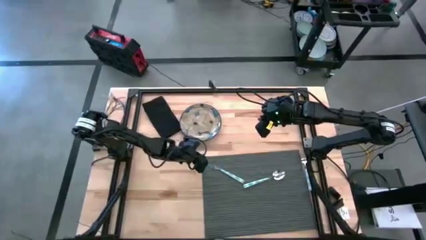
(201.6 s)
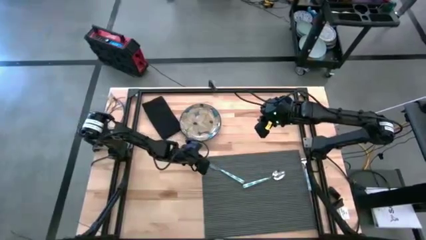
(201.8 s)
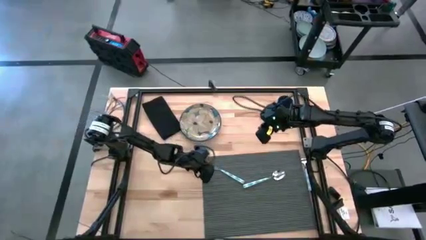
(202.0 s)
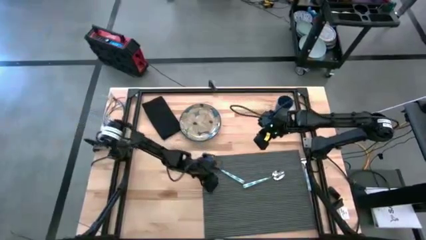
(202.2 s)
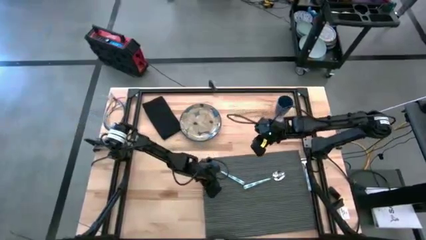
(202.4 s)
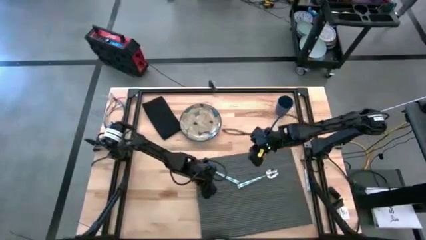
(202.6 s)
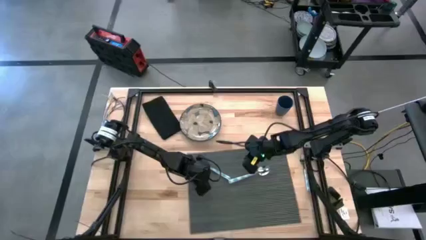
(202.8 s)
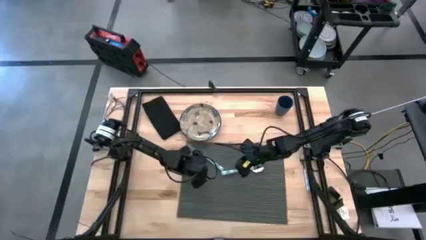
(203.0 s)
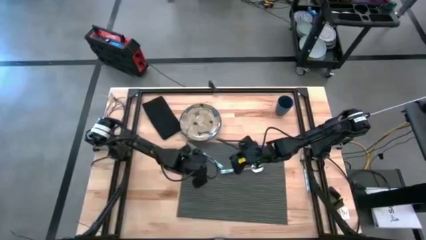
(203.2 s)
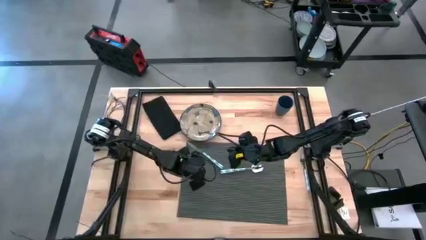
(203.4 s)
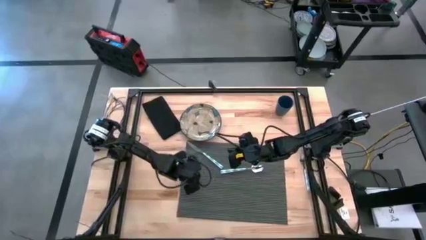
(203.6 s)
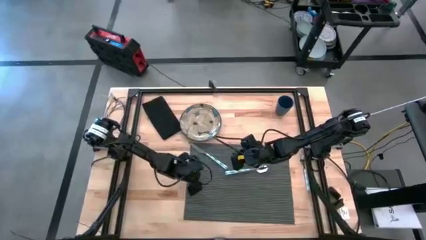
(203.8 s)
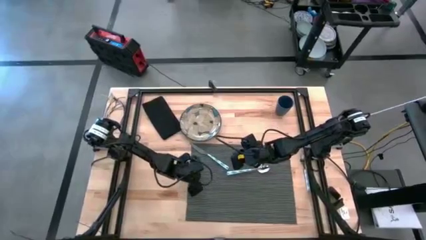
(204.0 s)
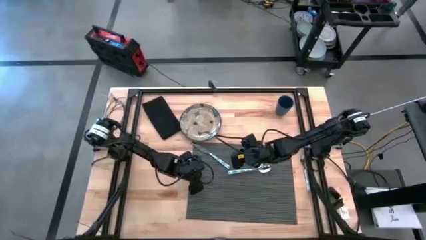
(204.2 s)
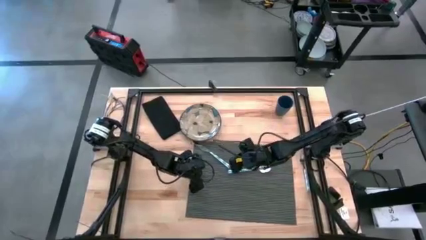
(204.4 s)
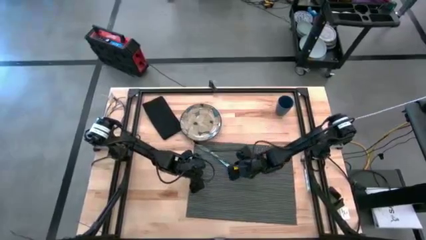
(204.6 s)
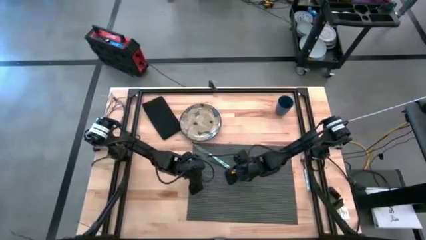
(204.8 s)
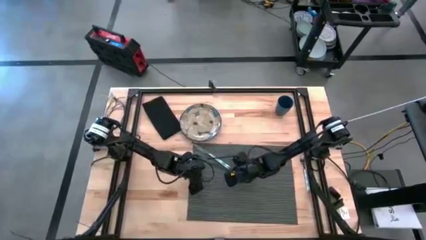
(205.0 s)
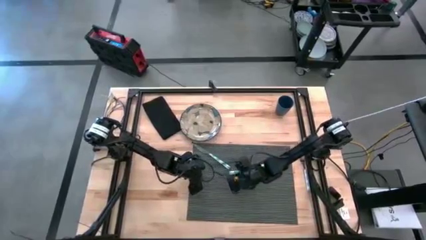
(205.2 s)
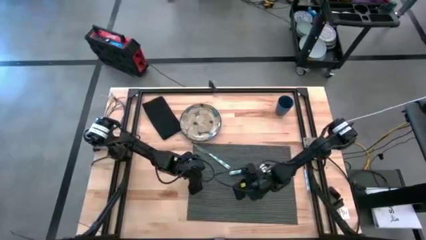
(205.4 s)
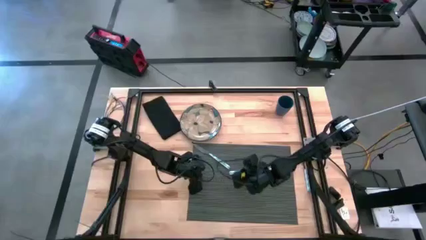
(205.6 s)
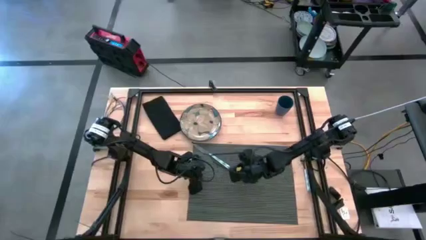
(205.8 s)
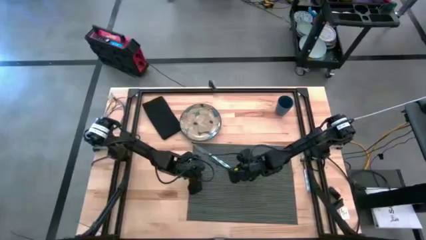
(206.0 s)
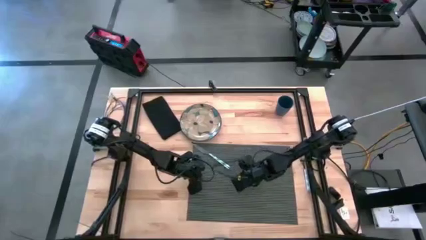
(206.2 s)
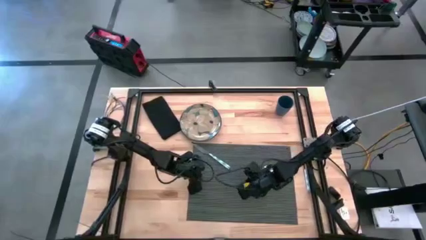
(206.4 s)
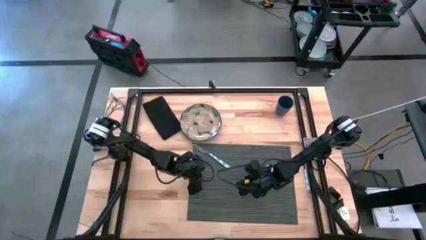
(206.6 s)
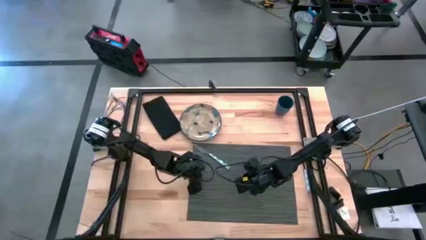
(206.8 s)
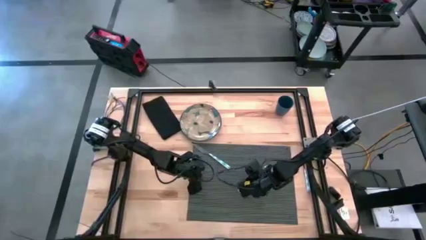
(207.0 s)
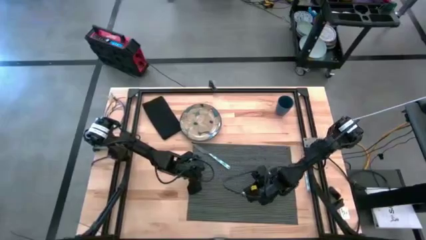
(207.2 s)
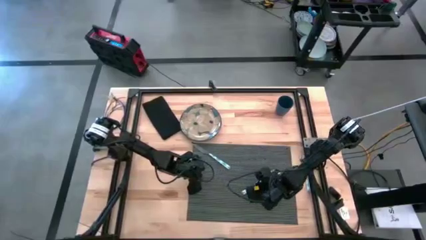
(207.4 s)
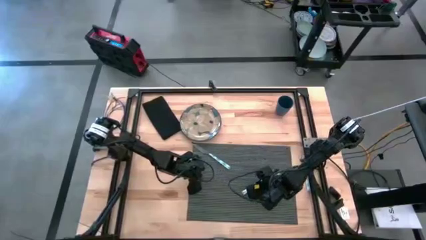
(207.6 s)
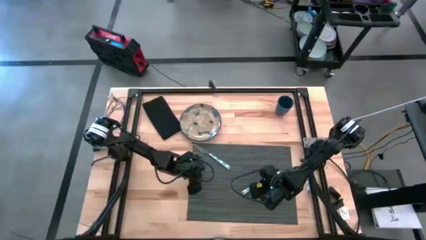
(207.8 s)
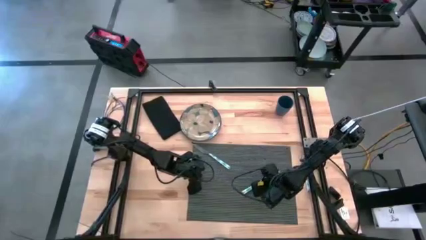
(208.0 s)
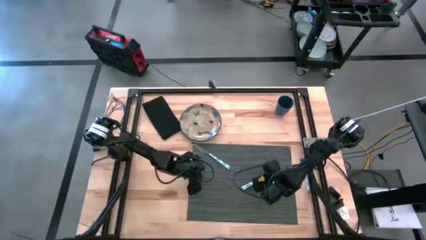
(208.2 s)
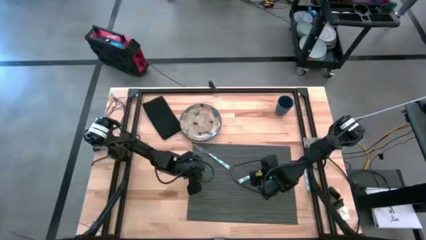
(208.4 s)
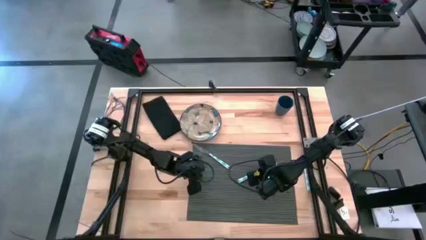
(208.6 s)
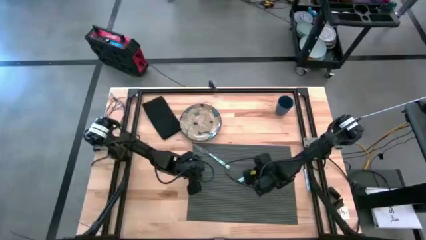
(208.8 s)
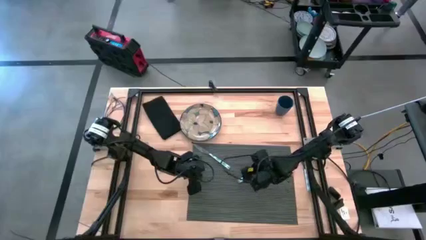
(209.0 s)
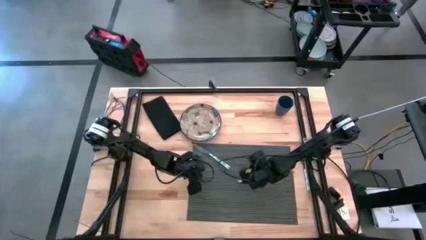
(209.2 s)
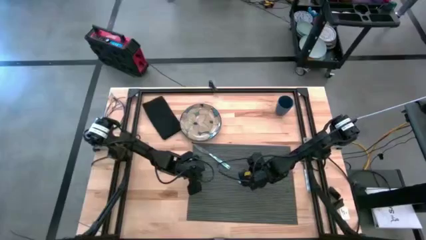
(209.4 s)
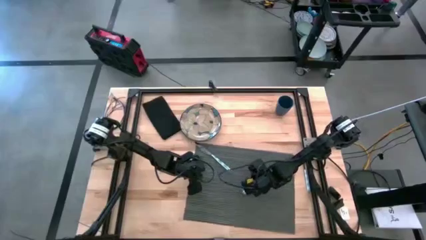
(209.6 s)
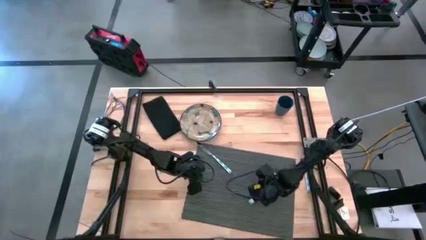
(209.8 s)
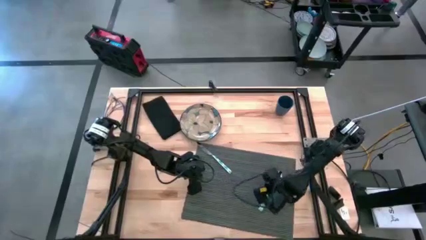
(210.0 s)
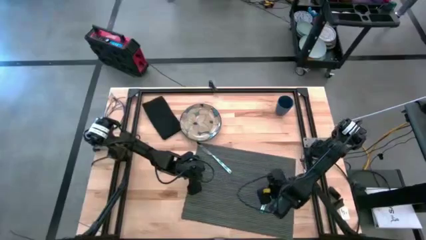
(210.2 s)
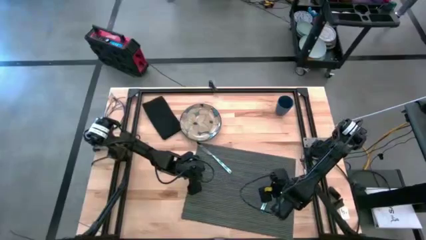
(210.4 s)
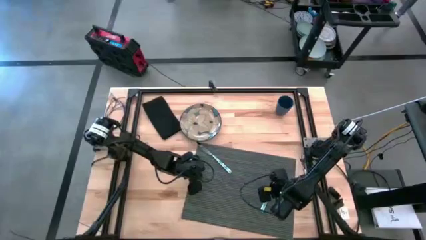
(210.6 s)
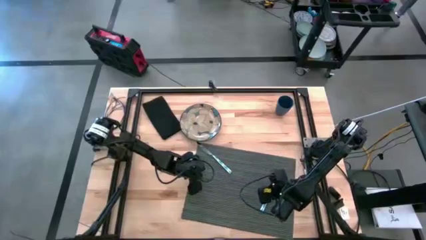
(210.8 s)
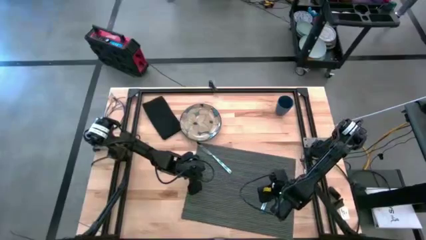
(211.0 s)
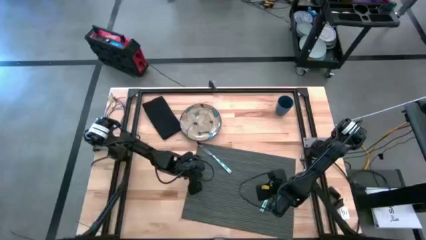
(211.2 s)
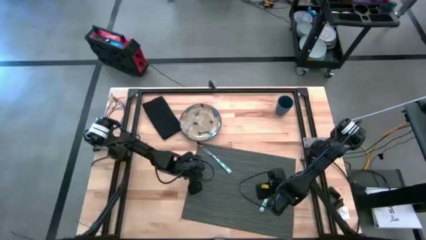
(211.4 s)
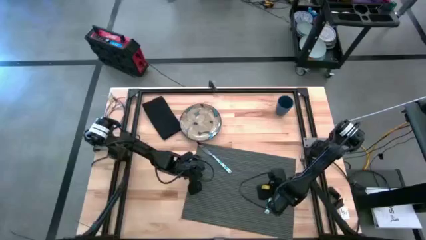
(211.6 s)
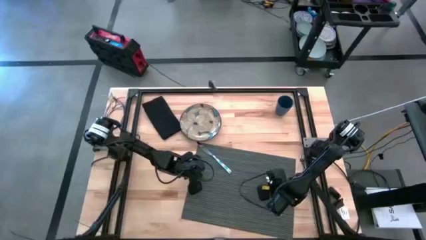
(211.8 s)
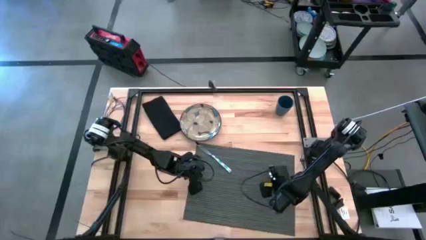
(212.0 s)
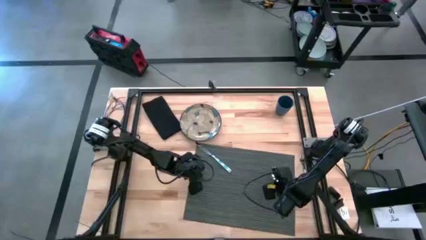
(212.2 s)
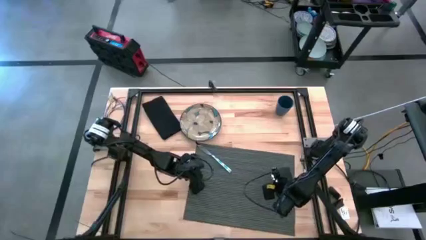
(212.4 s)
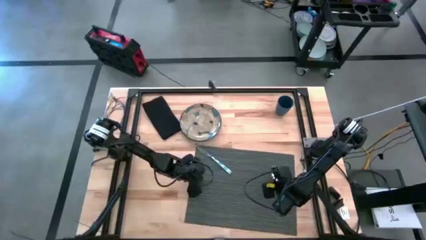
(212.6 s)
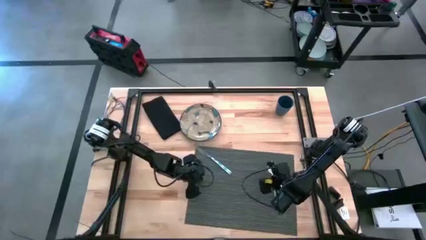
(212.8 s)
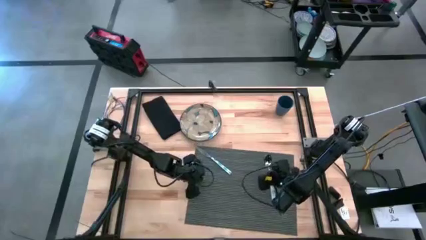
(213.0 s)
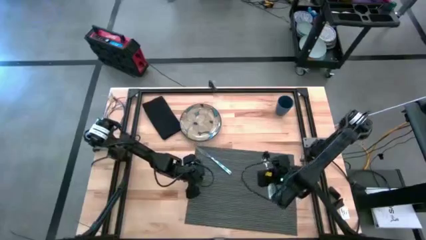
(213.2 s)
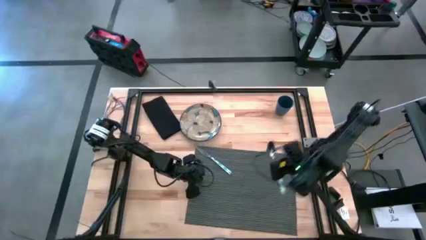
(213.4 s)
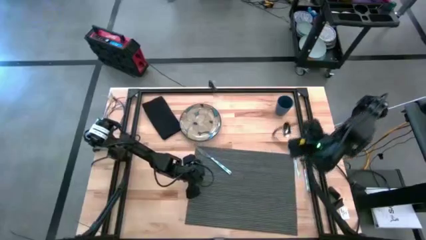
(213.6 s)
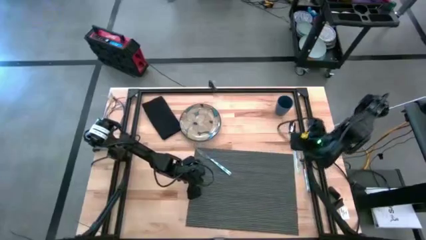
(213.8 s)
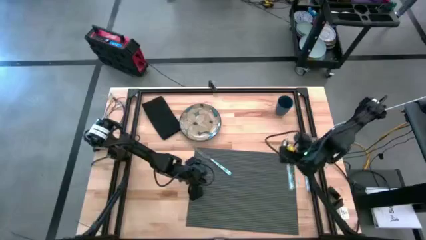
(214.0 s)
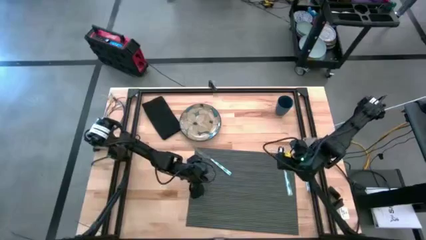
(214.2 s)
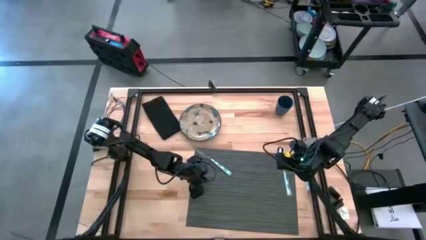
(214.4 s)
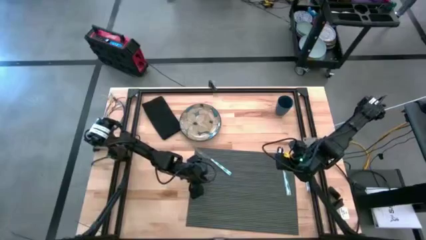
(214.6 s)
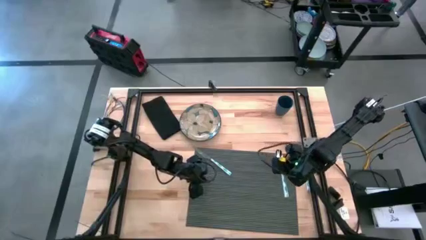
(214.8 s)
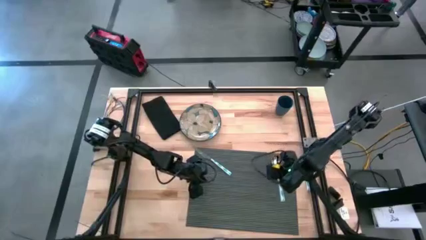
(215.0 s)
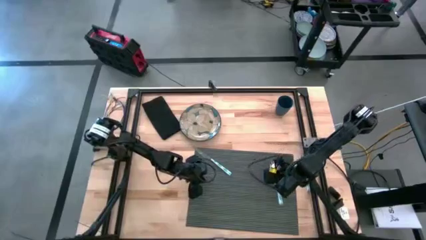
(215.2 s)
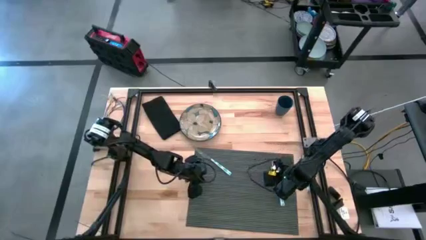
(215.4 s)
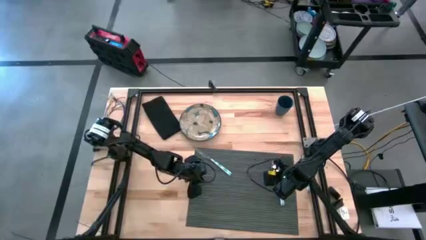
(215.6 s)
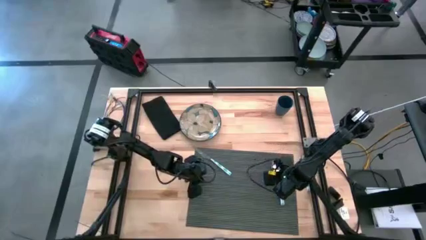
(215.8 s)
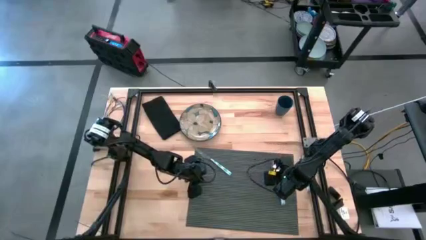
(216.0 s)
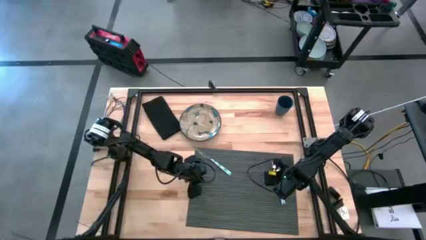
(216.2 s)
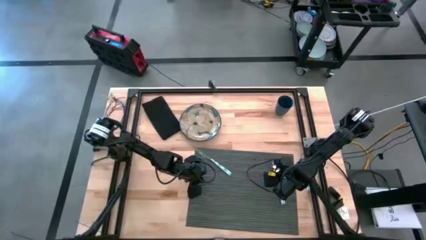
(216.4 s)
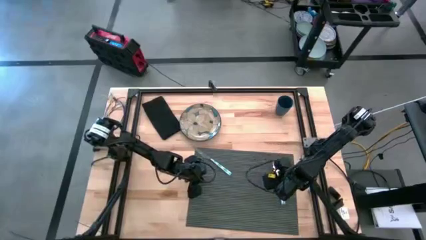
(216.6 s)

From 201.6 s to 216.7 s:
Task: Set table place
Put the blue spoon on the gray mat

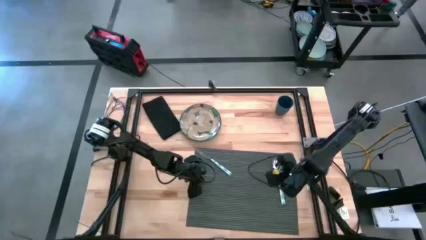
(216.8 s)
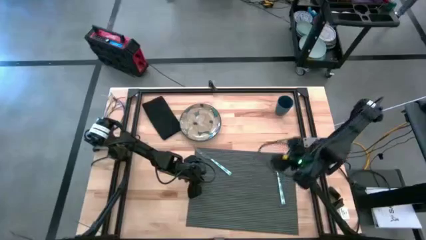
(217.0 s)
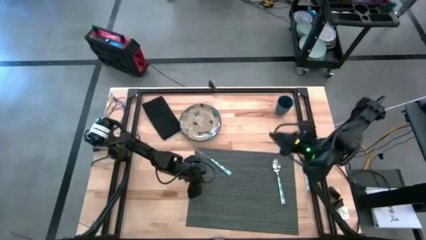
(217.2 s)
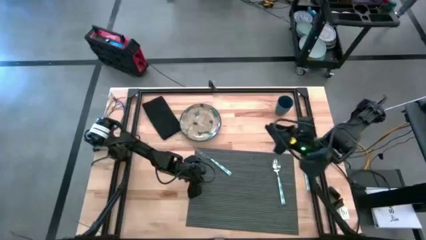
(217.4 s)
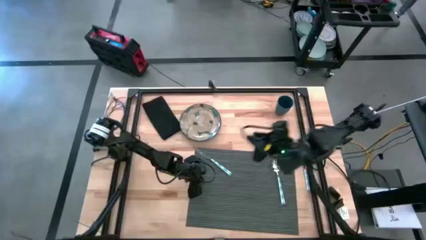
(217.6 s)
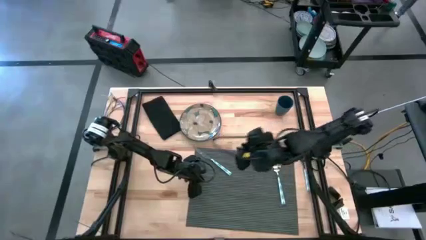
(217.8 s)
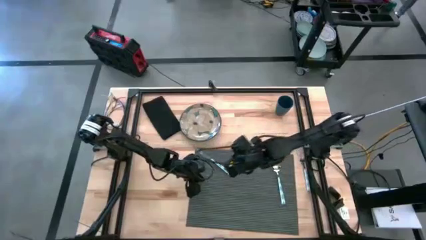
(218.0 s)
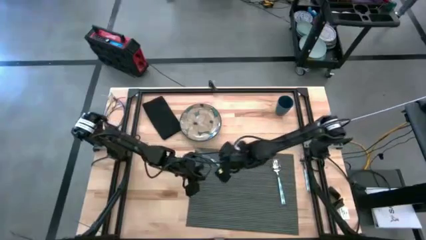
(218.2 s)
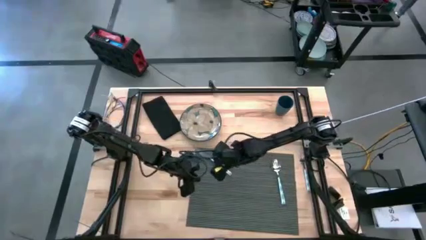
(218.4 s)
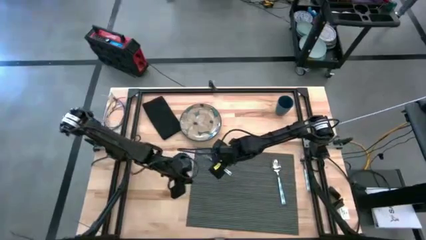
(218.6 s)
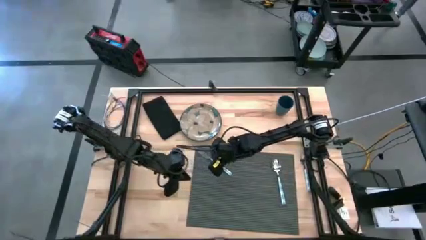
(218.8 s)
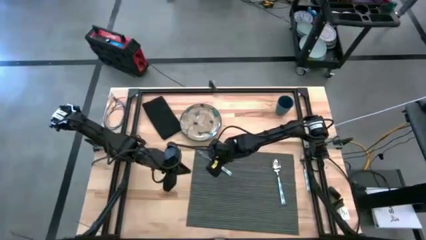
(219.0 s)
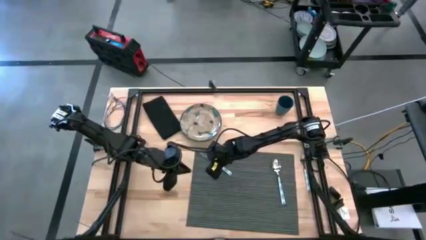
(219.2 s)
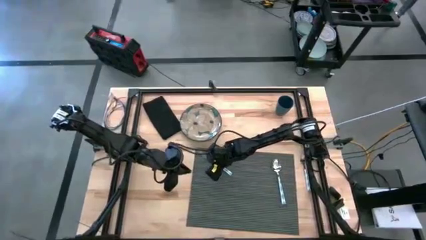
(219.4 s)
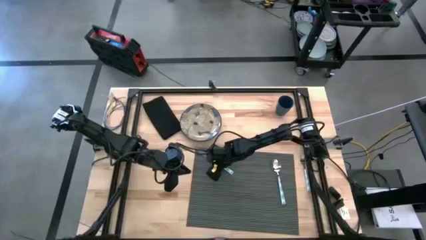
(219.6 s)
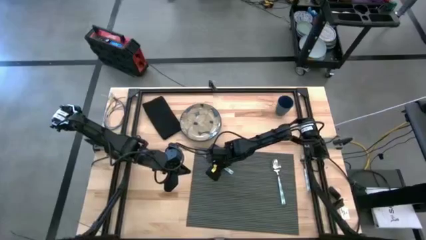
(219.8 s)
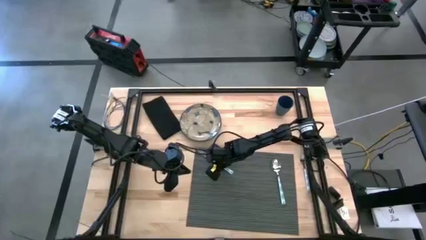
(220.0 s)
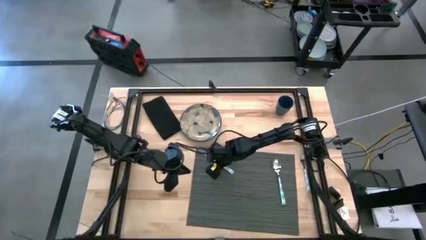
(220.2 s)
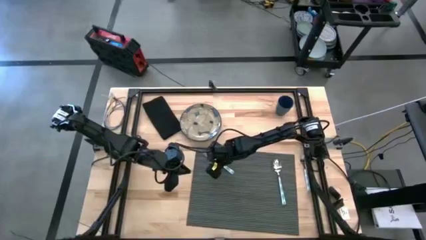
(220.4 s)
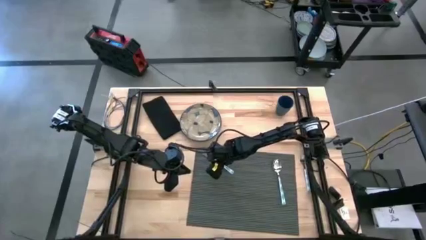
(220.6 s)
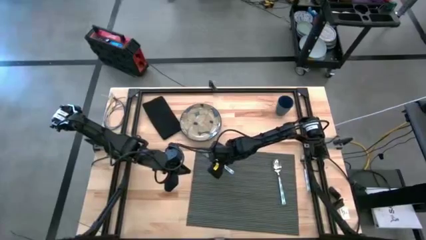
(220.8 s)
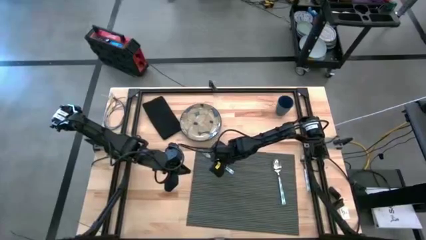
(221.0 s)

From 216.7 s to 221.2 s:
Put the blue knife on the gray mat
